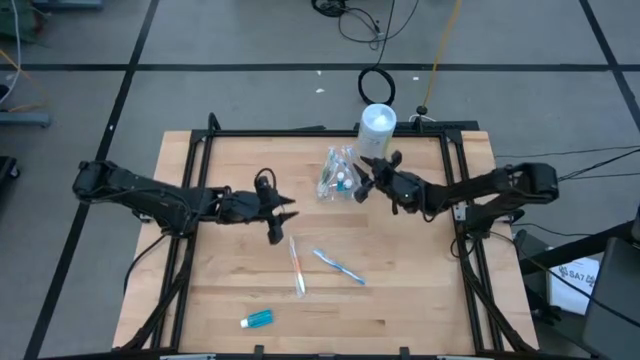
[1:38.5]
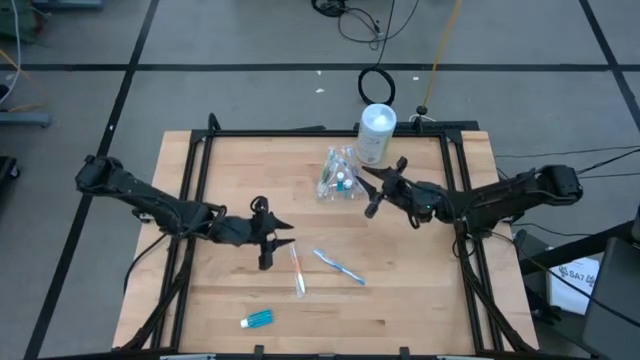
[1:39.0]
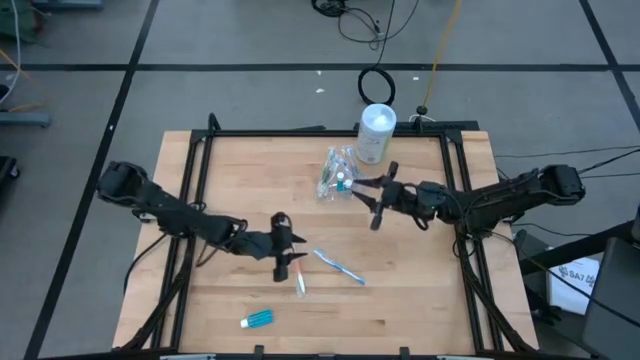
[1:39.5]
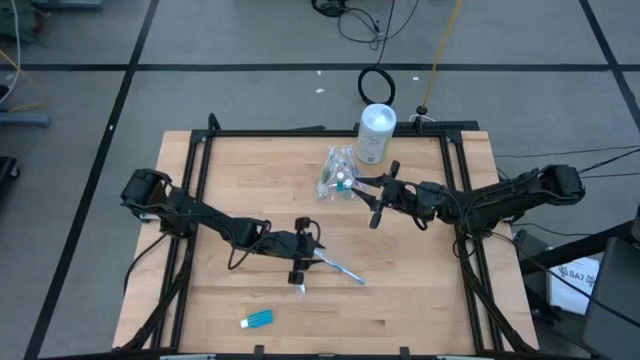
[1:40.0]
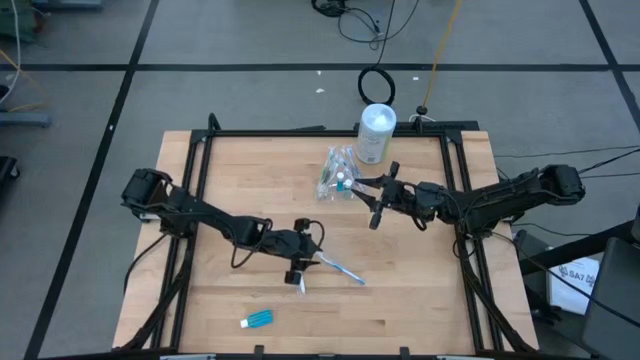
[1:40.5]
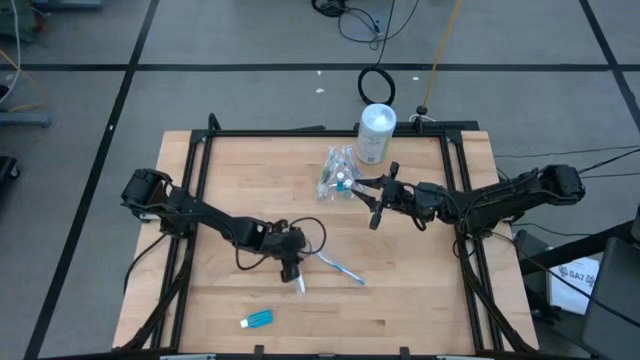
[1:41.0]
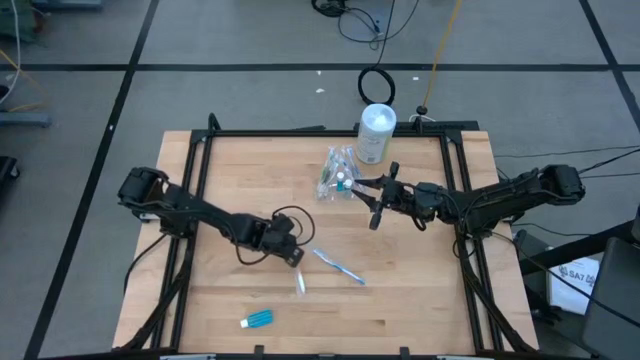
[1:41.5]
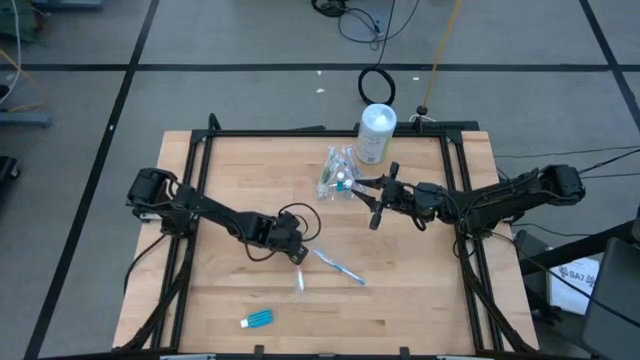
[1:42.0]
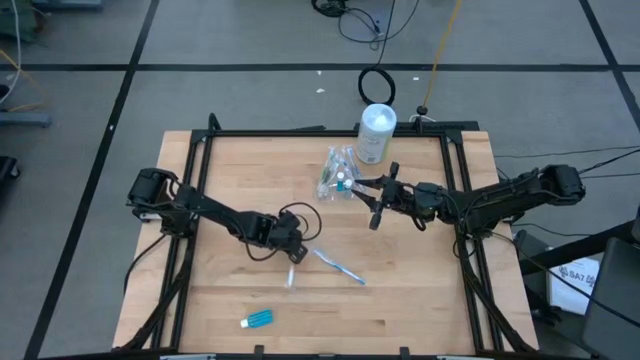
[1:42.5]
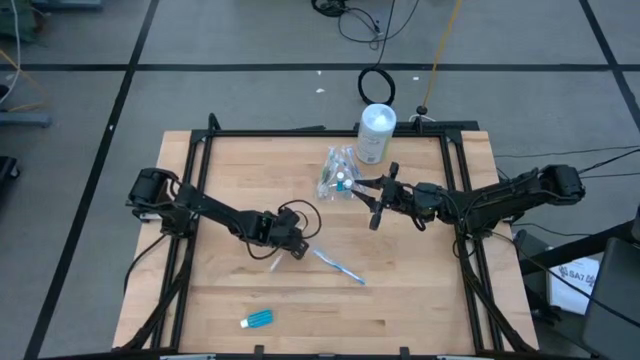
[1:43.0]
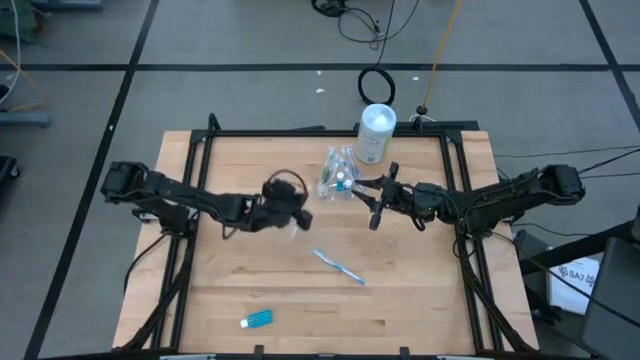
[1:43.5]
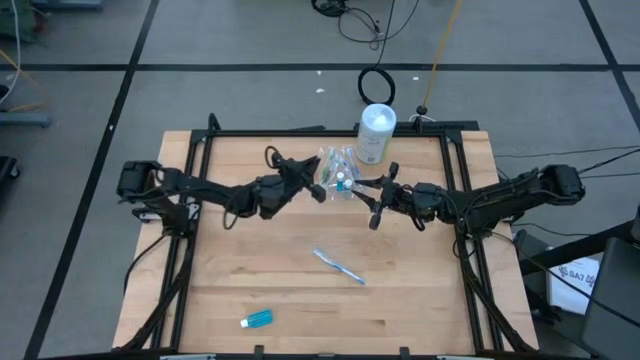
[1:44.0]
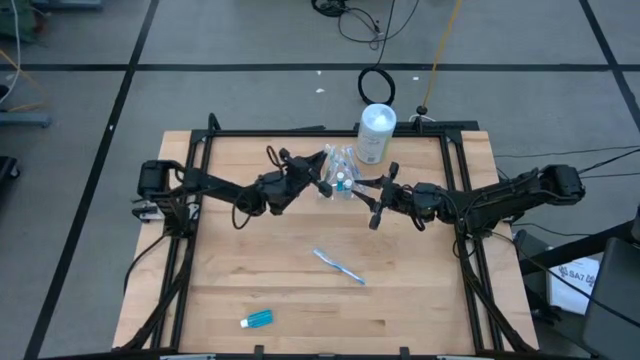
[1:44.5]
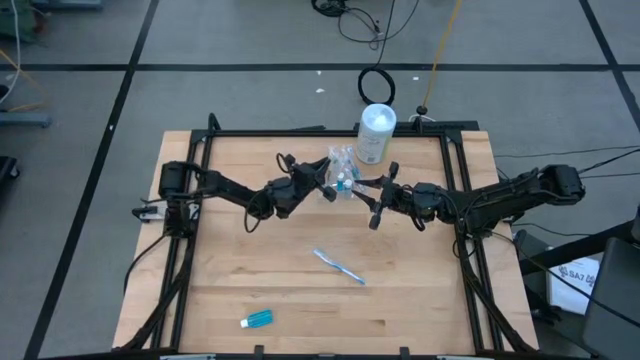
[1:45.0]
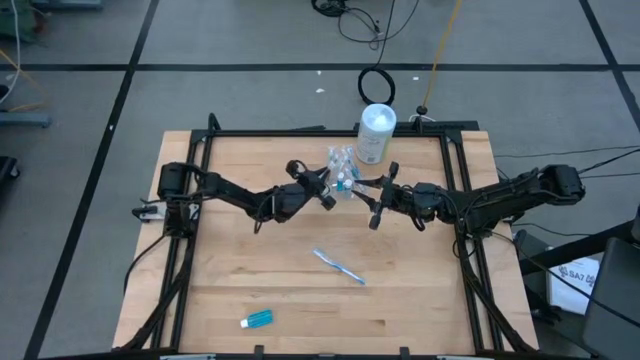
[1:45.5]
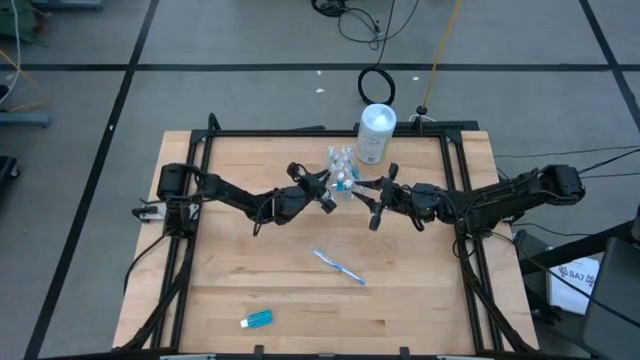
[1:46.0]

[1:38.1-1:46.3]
Task: Pick & Place toothbrushing station
Put the orange toothbrush into the transparent organizer

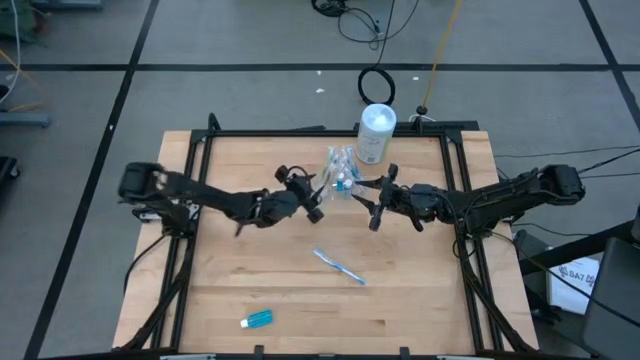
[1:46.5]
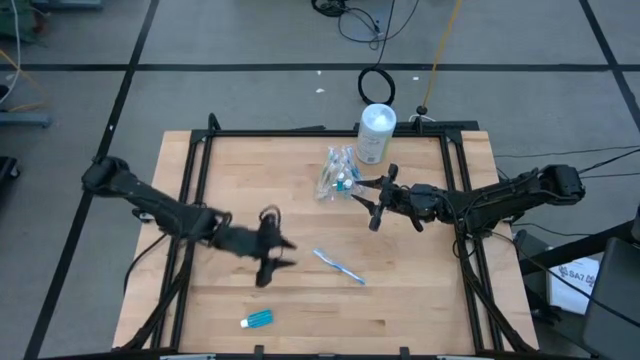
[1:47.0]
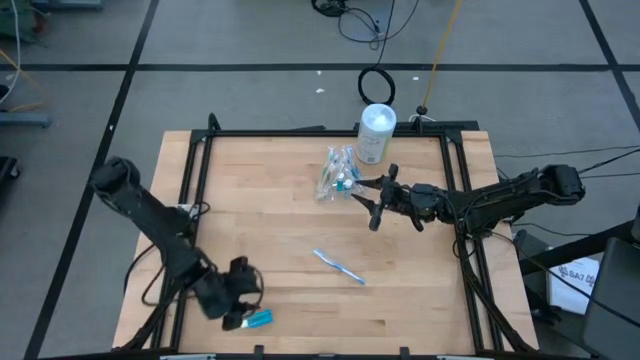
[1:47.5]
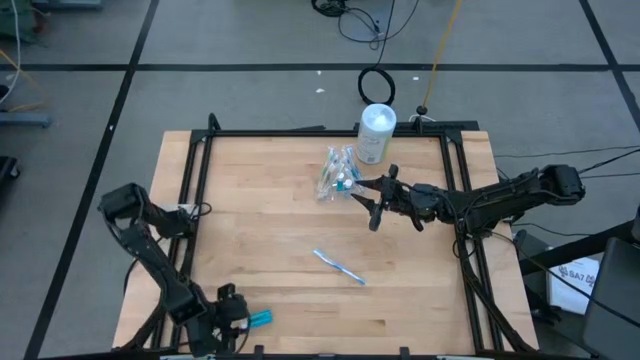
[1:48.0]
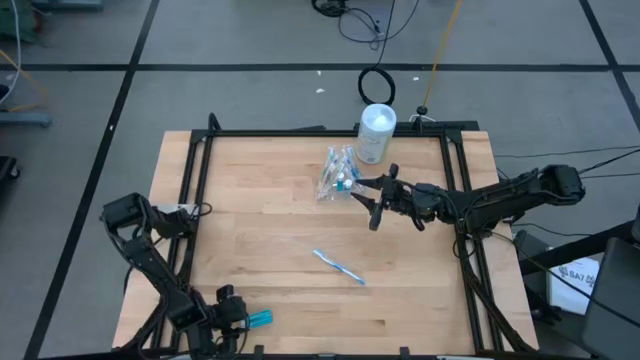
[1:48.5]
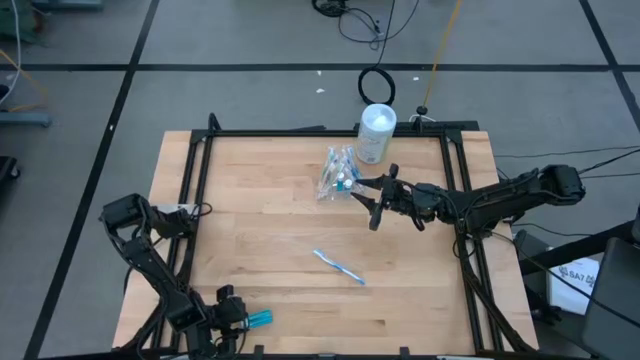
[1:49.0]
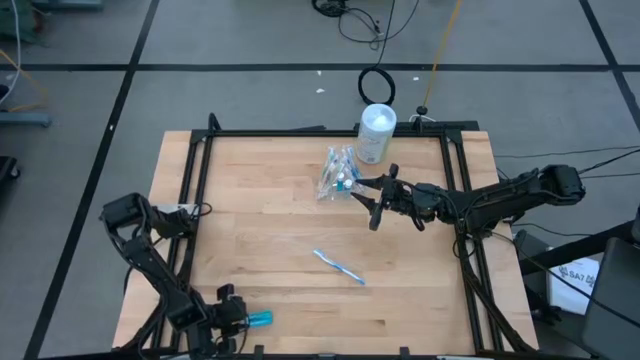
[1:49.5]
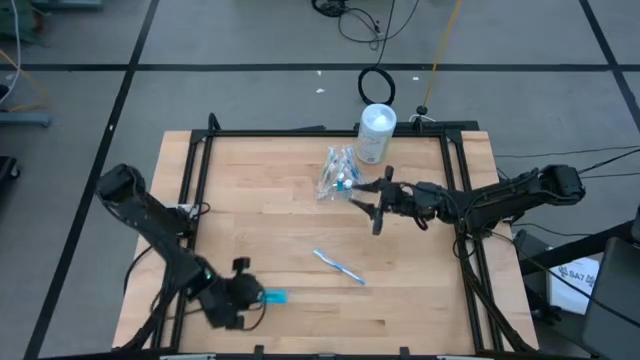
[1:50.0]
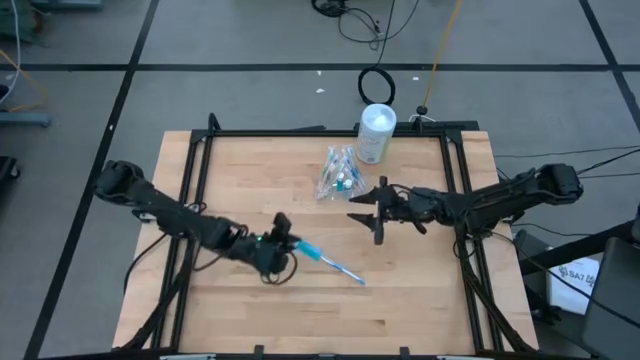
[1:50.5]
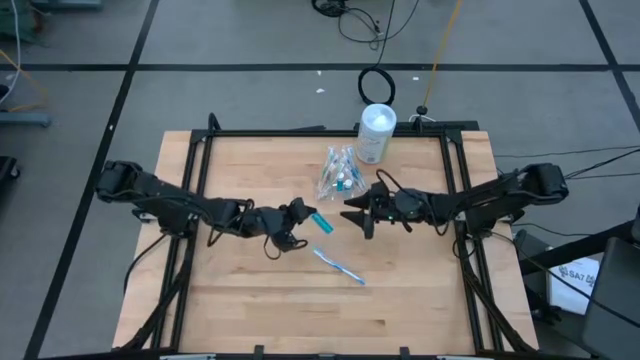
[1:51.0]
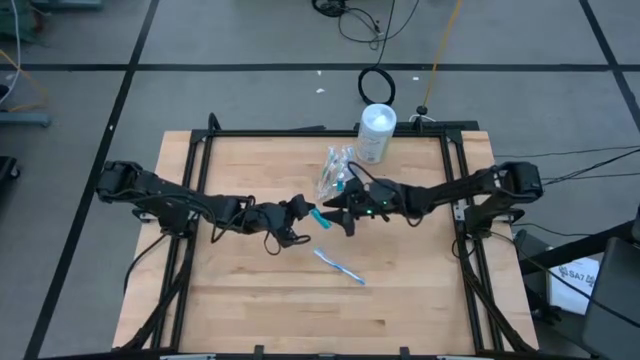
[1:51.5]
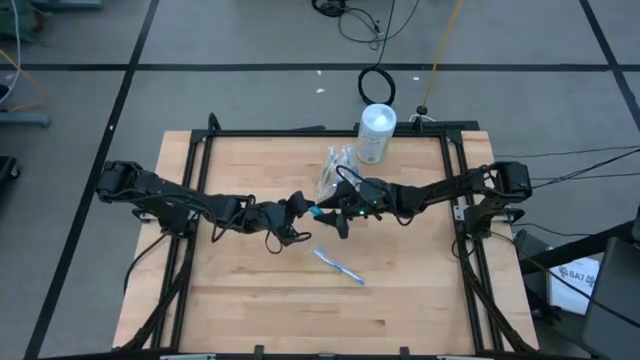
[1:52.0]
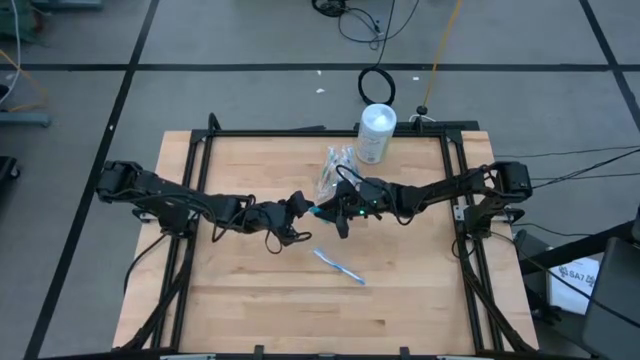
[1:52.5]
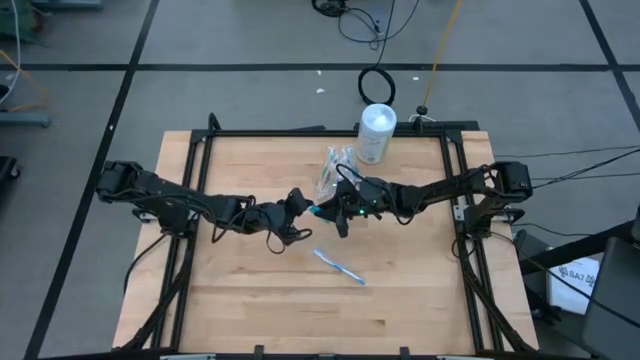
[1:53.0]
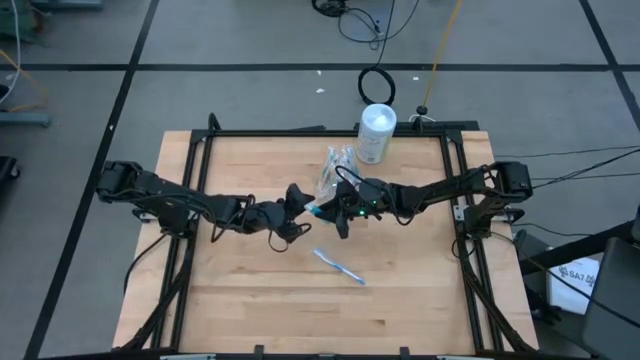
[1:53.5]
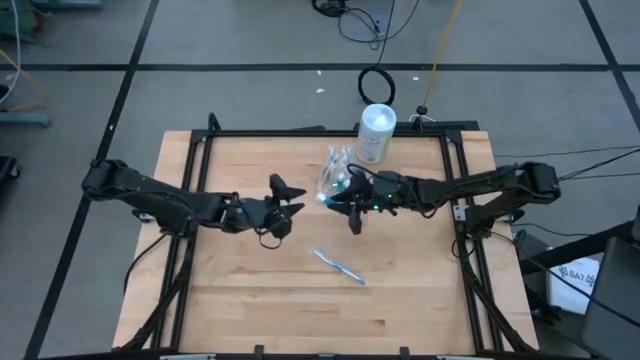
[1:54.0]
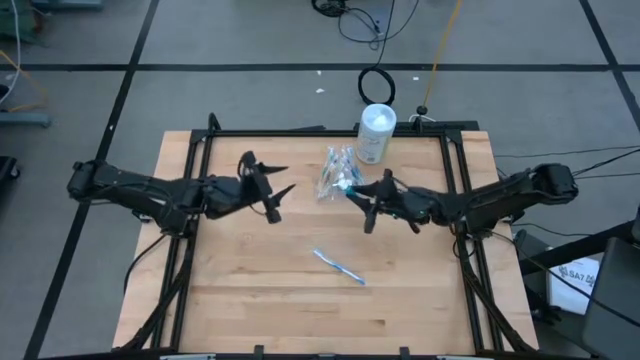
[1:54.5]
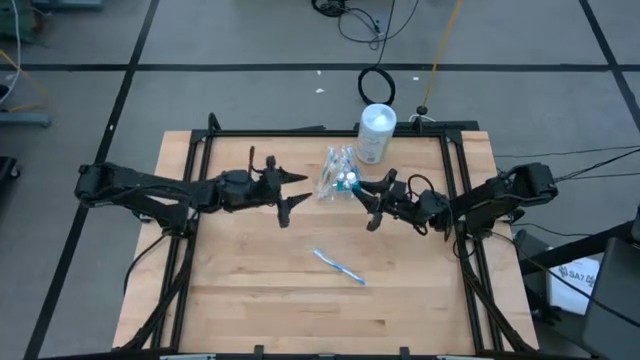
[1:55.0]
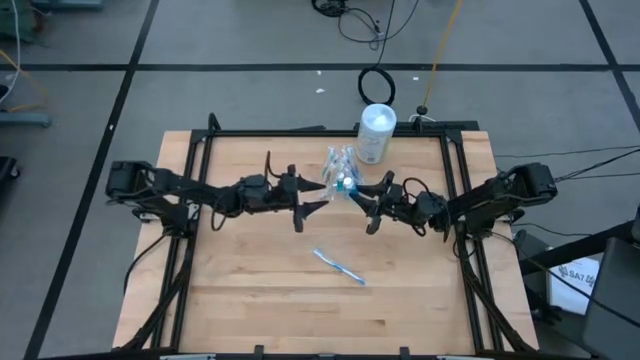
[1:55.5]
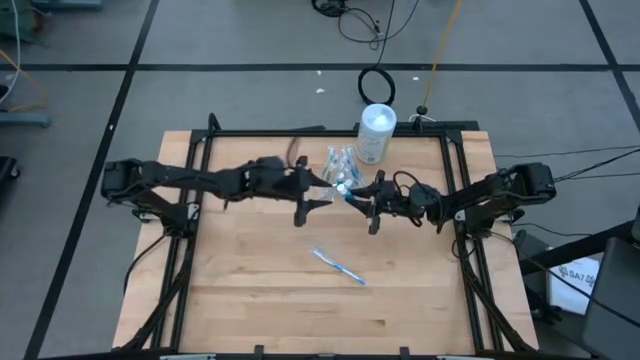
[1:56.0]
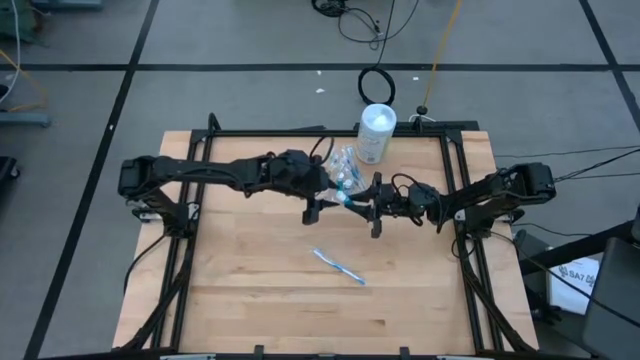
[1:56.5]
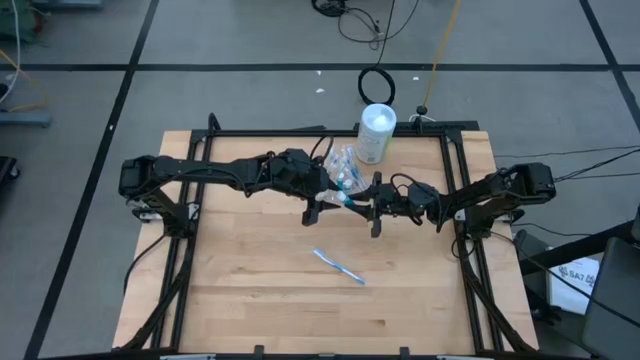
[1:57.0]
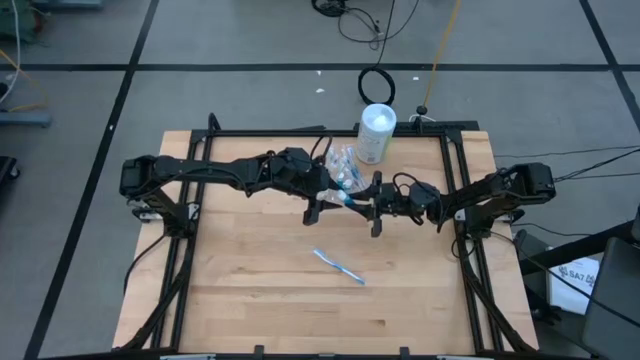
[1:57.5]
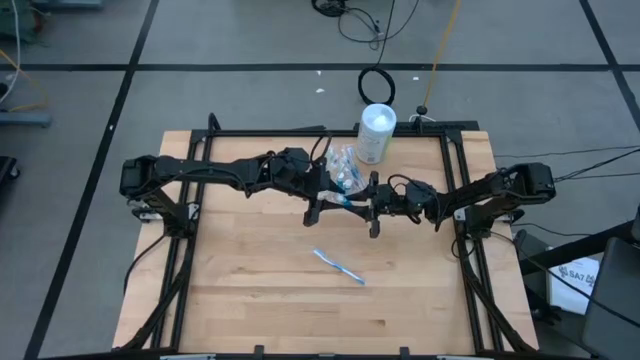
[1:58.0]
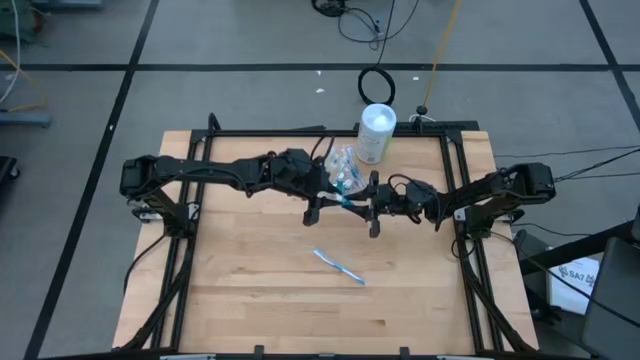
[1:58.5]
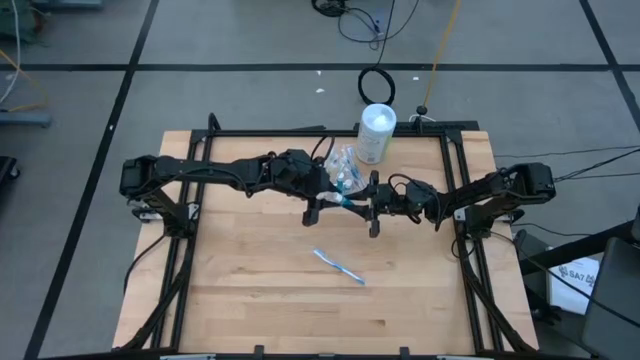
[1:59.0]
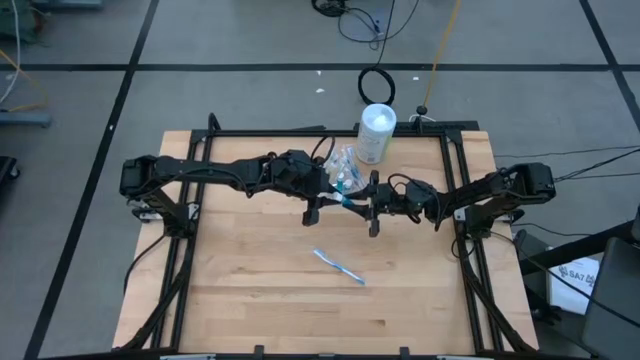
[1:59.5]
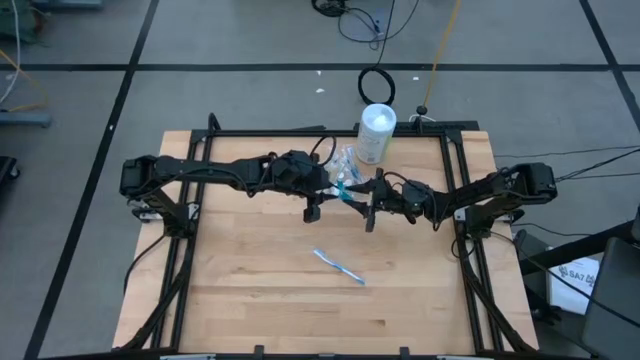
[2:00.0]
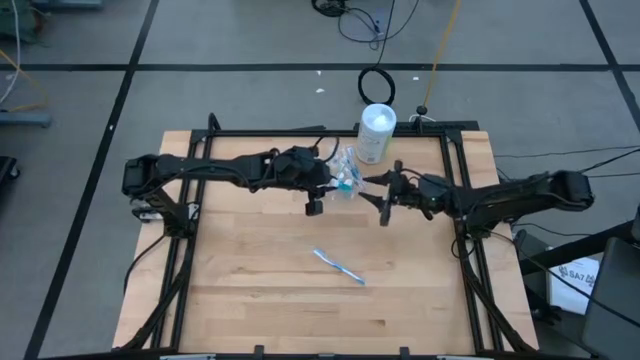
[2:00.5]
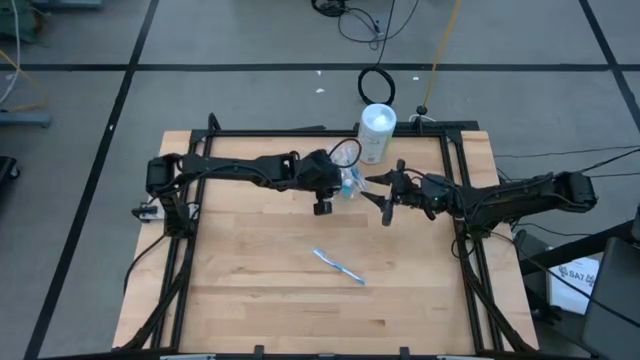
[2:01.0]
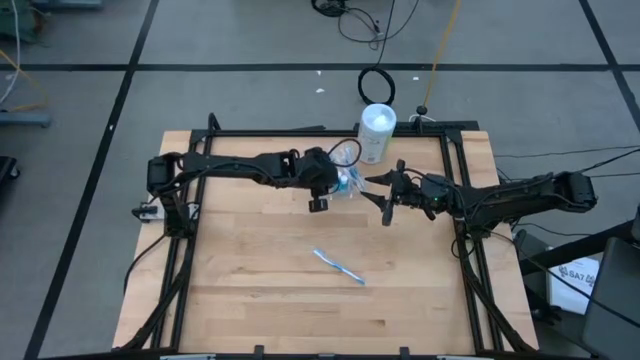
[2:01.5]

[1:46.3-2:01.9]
Put the blue mouthwash into the transparent organizer
